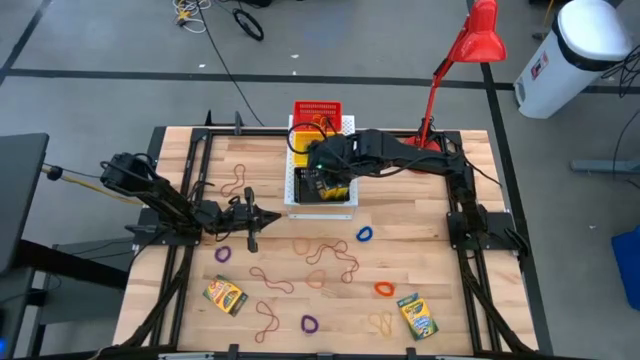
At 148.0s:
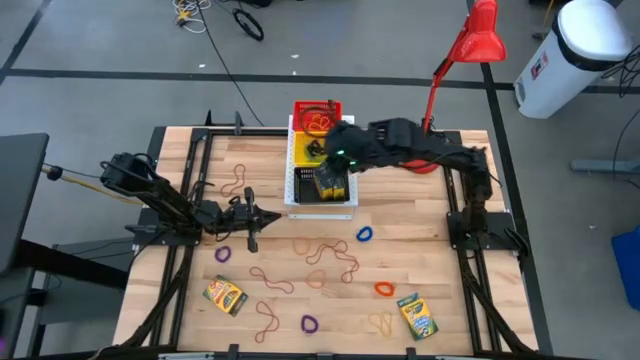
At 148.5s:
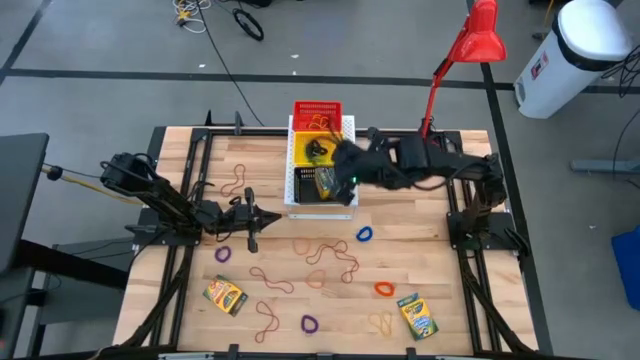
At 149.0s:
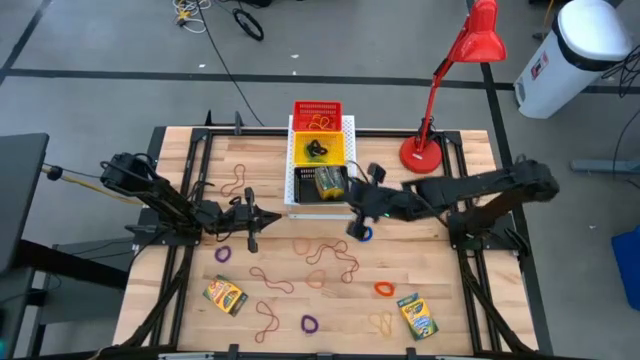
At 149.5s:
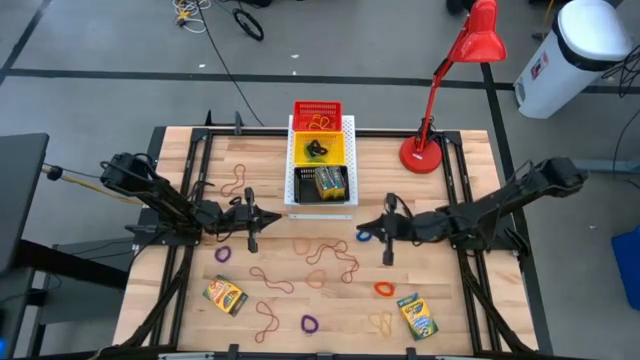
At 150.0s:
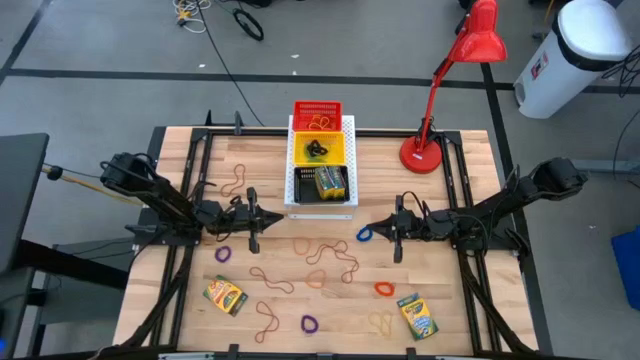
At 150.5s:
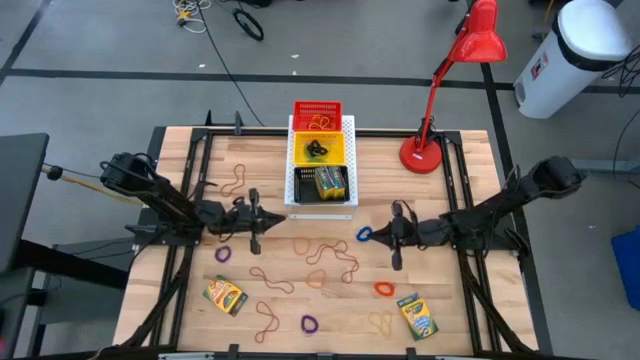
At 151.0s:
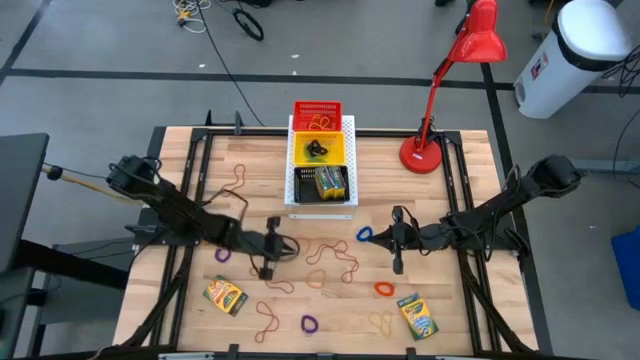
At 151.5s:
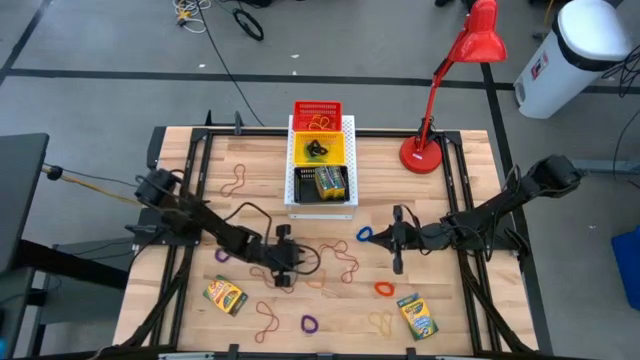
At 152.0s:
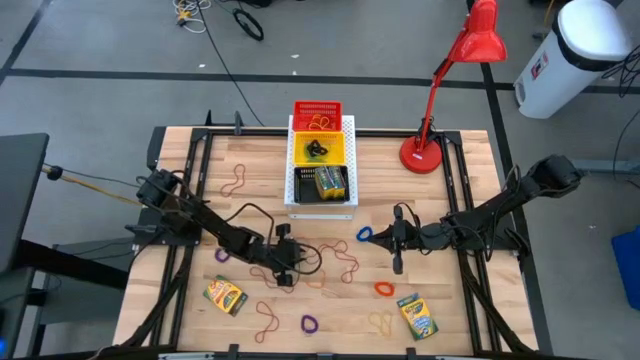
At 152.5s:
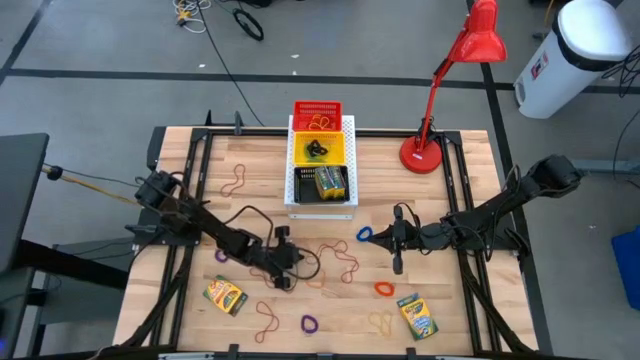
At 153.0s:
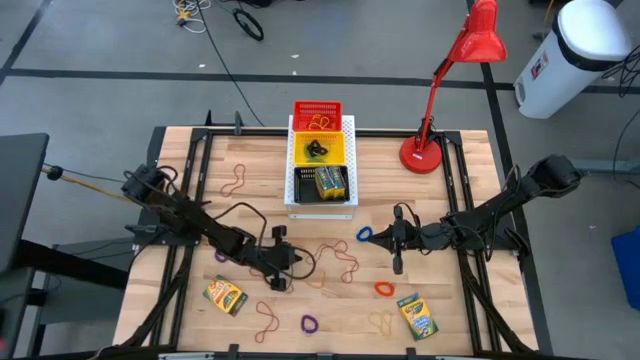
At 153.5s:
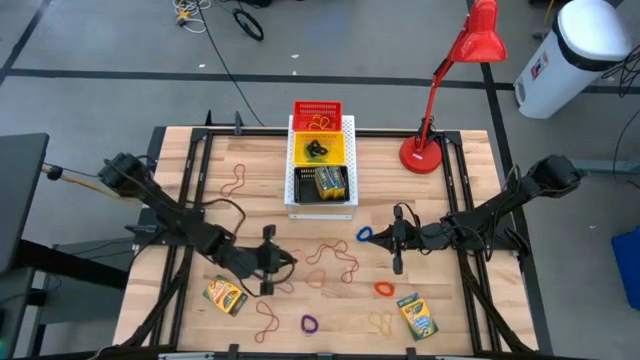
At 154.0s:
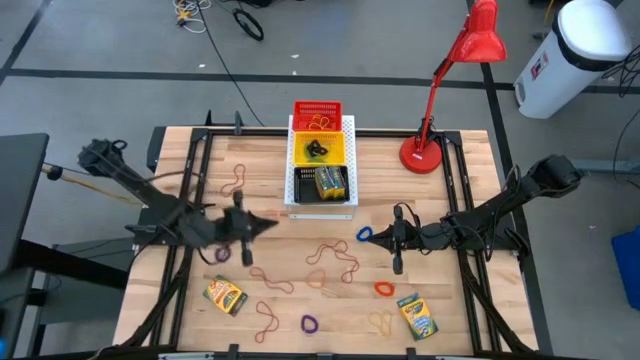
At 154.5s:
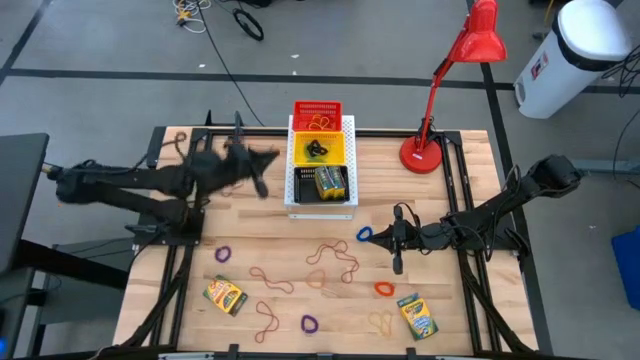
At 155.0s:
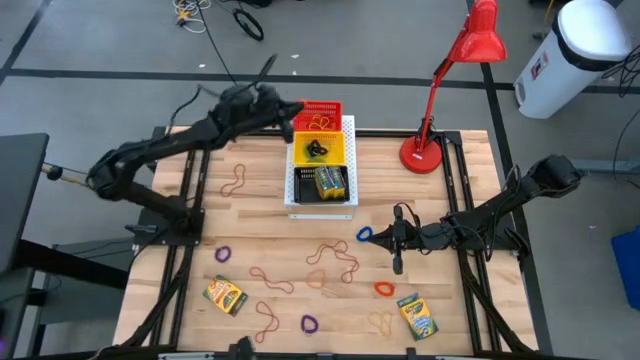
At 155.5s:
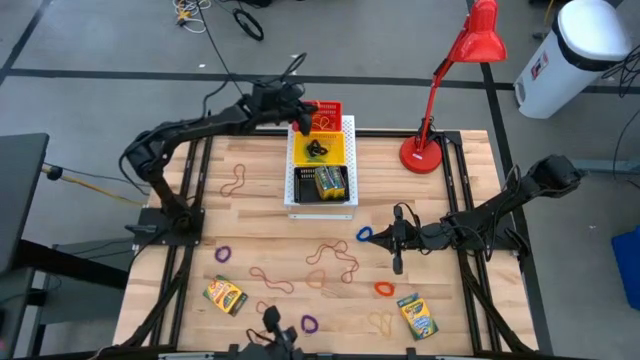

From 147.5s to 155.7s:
Task: Pick & Place Office Desk Supplies
Put the orange rubber band into the red bin on the shelf

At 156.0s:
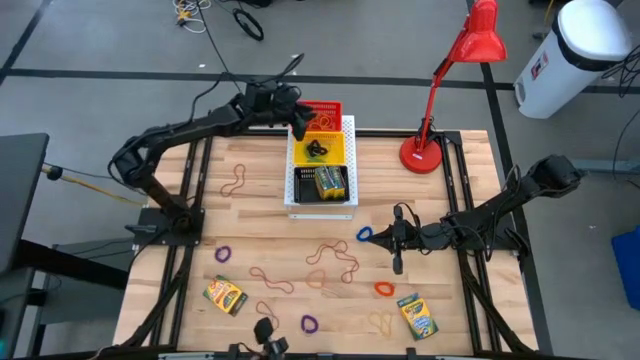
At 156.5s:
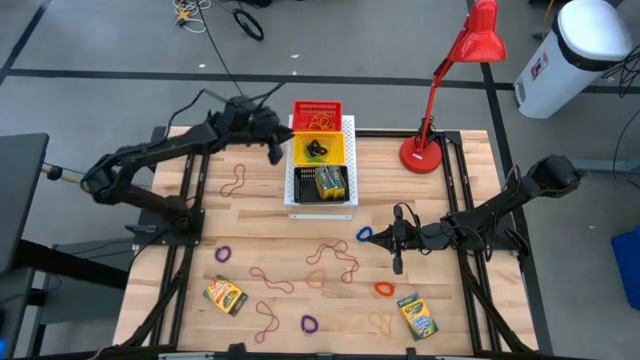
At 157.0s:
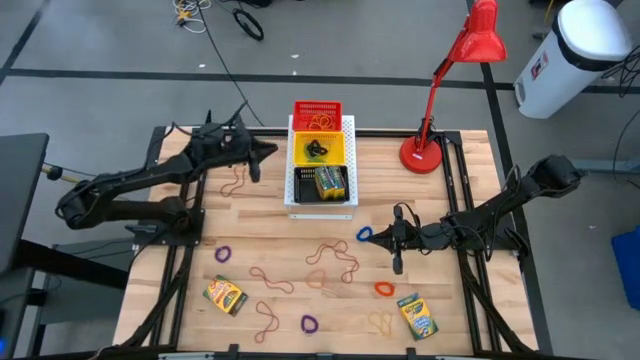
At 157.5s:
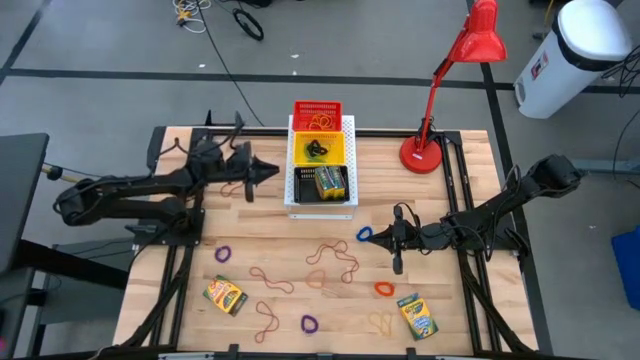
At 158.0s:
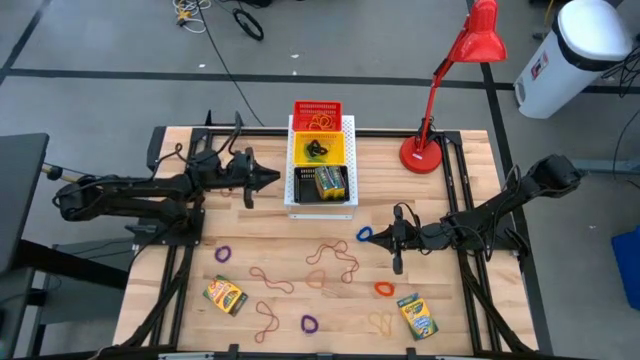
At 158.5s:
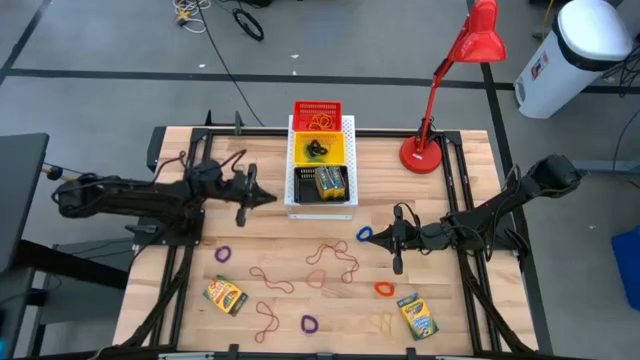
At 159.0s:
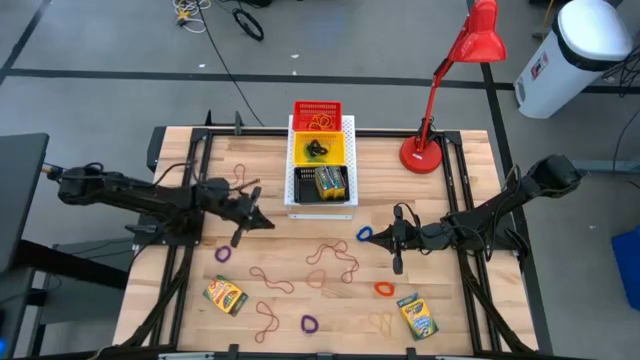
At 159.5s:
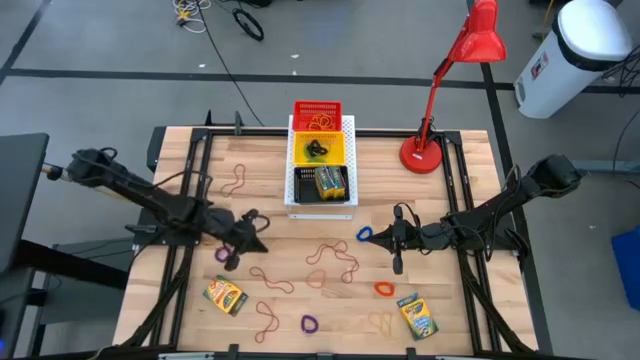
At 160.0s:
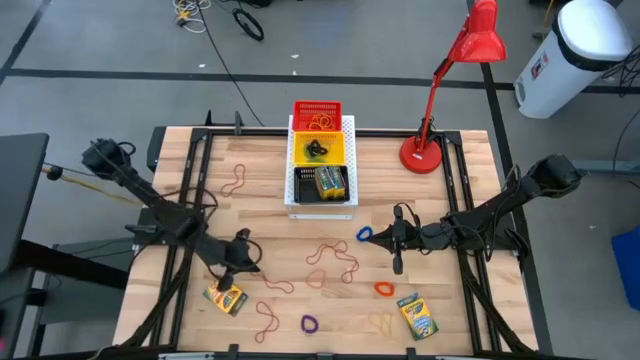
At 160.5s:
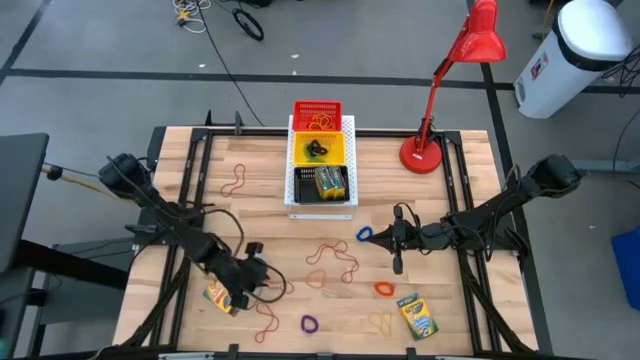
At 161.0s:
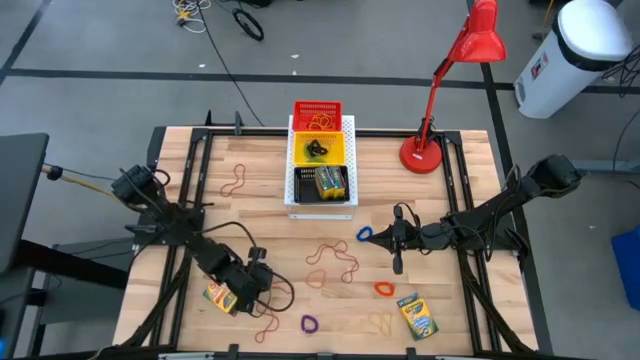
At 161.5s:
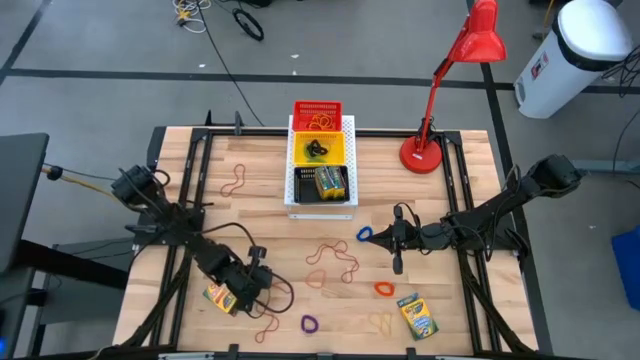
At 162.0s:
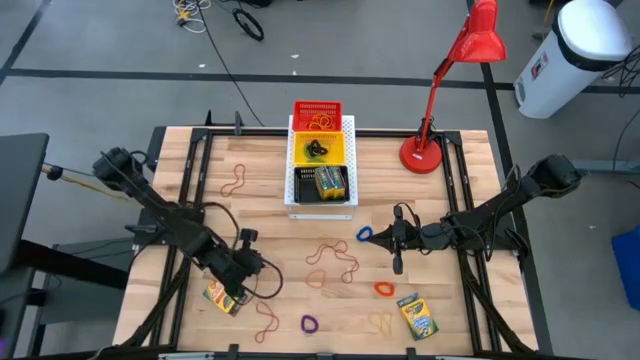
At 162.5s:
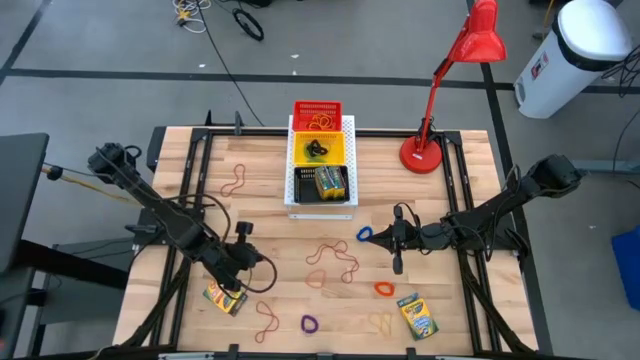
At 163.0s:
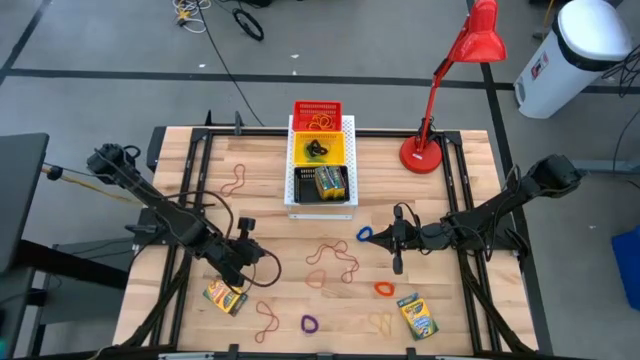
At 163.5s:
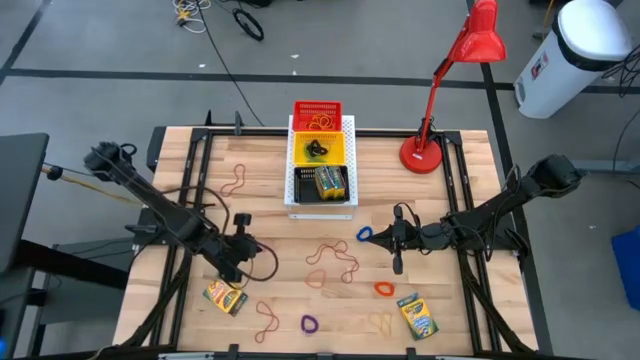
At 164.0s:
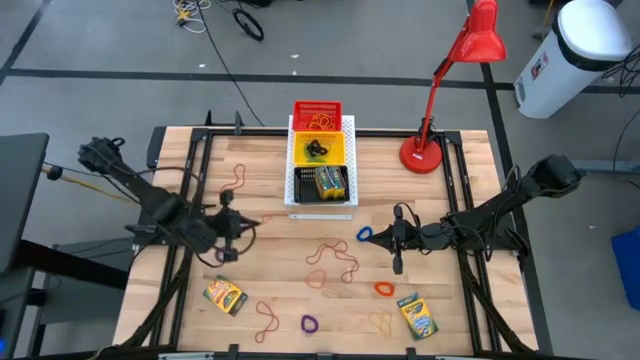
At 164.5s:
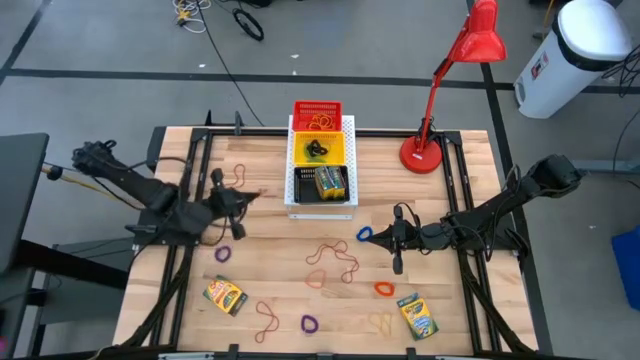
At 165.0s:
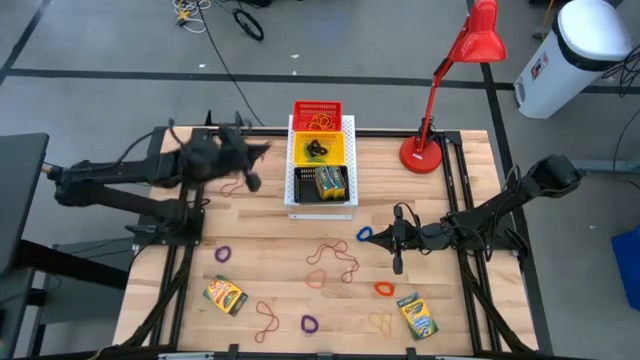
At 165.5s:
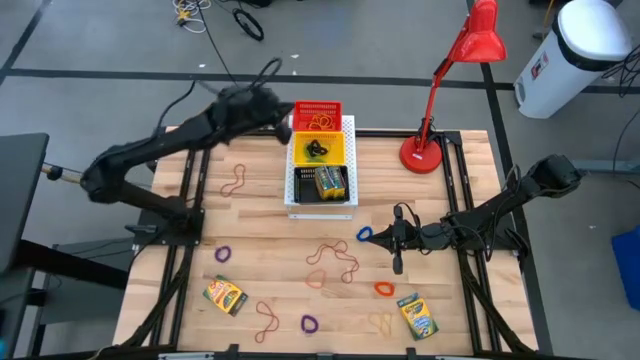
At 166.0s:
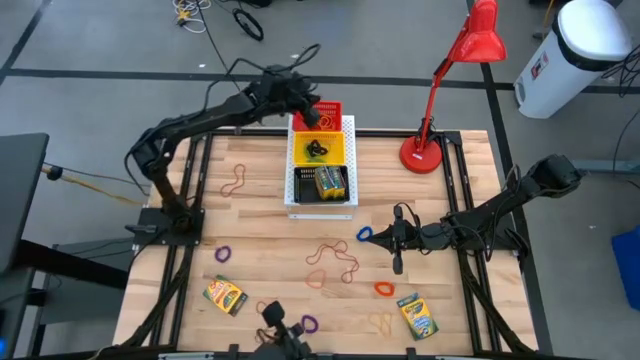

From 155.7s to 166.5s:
Put the red rubber band into the red bin on the shelf

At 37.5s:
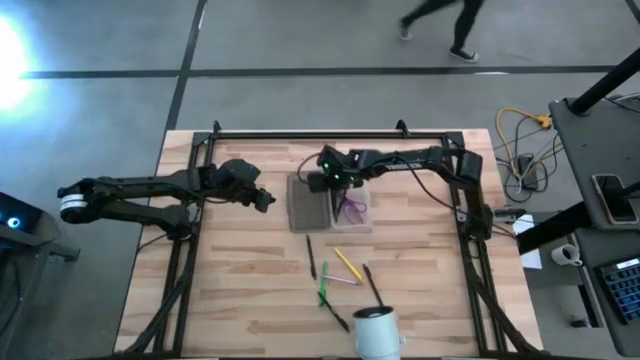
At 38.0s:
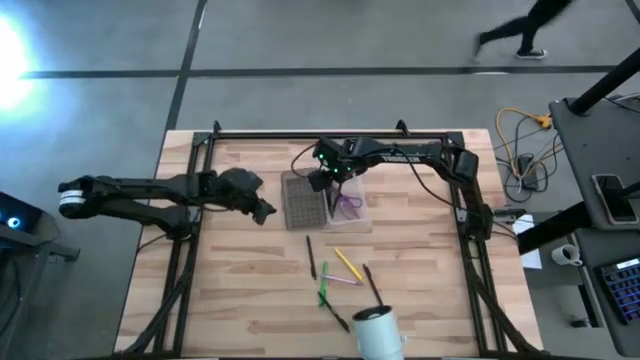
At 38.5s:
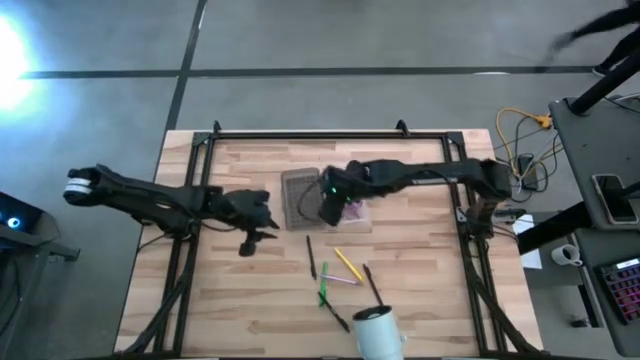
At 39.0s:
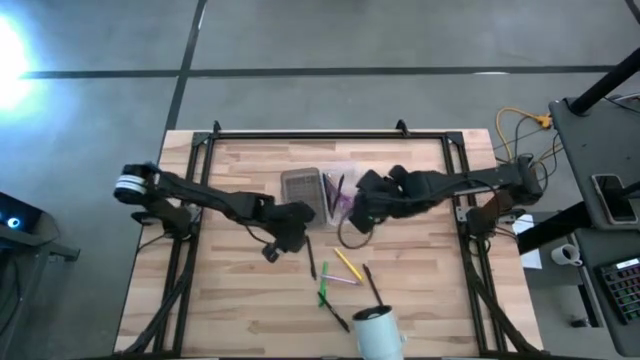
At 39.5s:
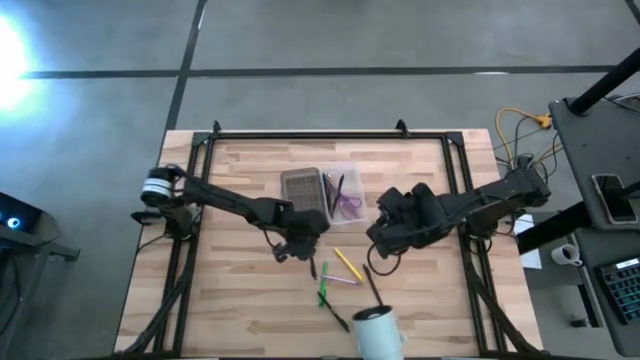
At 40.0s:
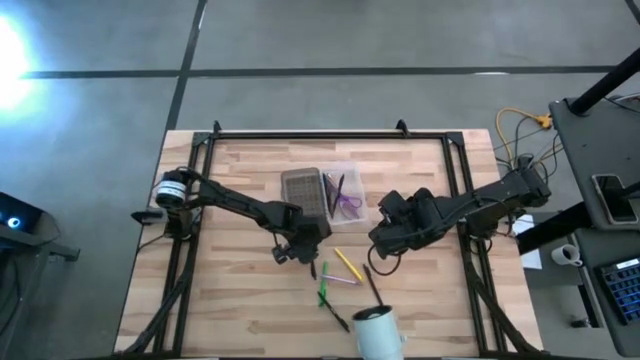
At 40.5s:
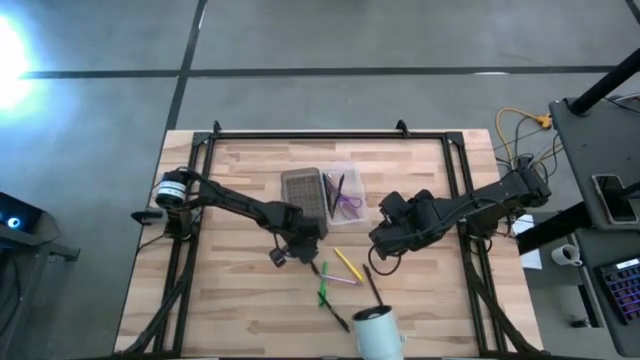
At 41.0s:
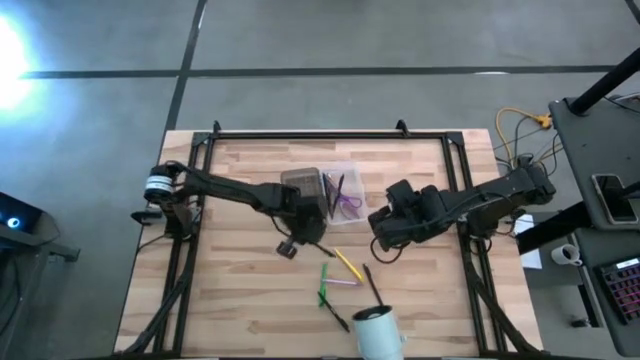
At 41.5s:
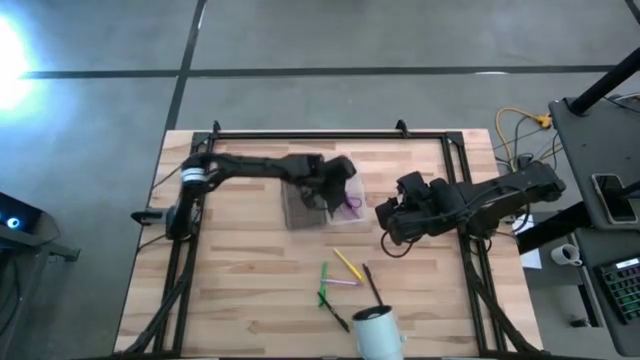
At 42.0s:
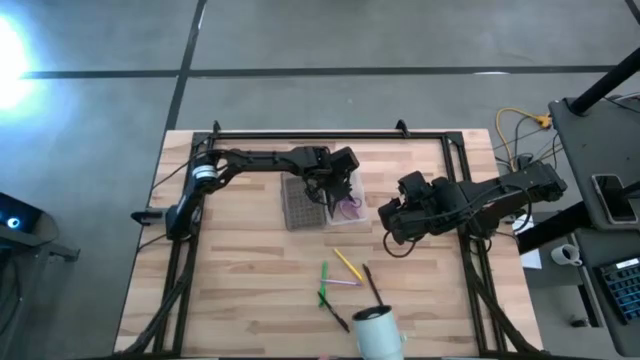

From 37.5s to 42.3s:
Task: Pick & place school supplies into a supply box
Put the black pen into the gray supply box
